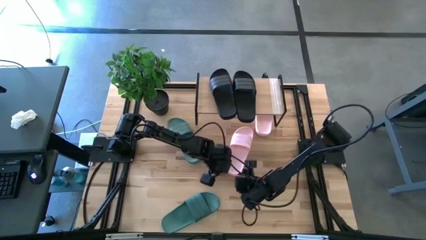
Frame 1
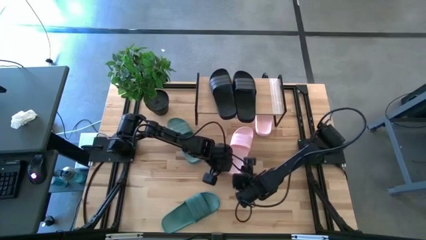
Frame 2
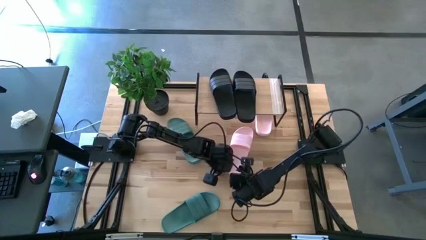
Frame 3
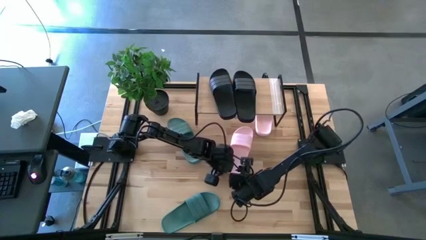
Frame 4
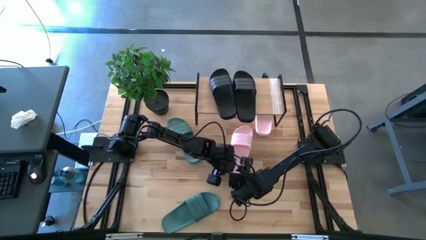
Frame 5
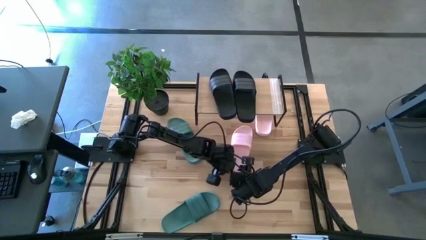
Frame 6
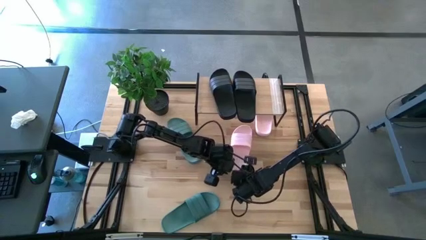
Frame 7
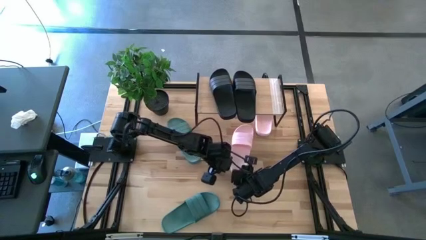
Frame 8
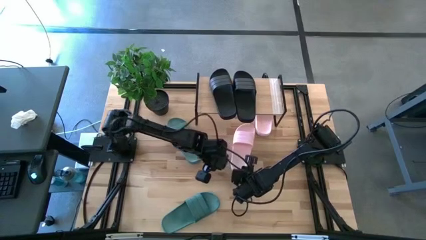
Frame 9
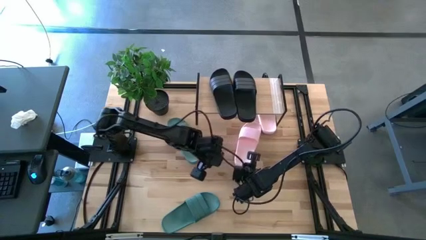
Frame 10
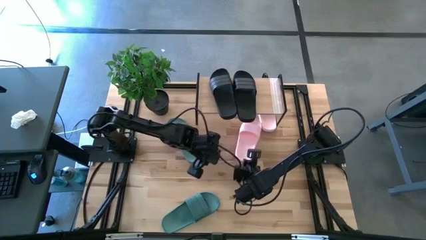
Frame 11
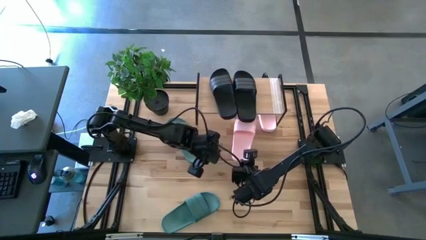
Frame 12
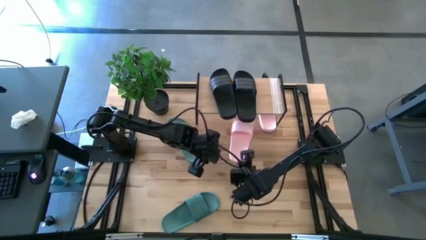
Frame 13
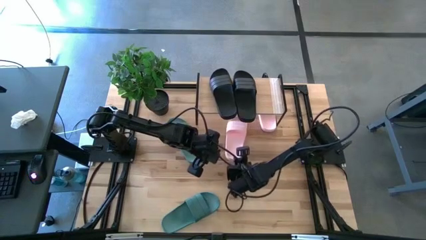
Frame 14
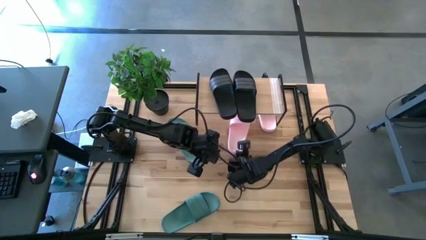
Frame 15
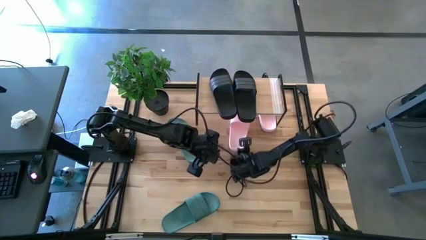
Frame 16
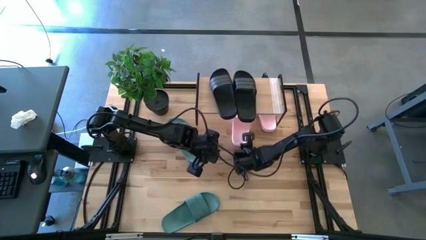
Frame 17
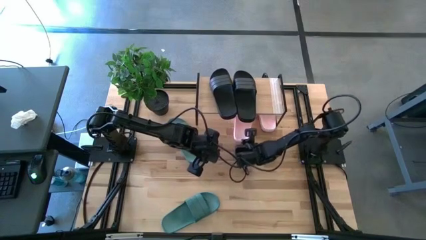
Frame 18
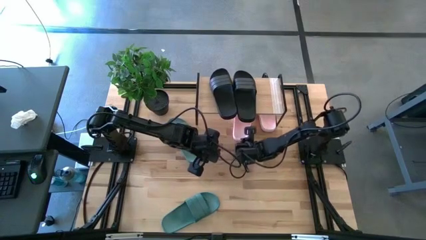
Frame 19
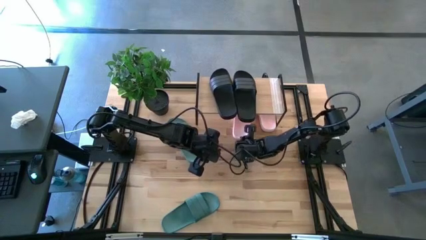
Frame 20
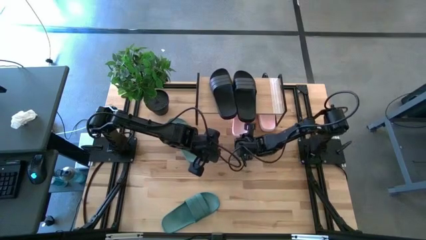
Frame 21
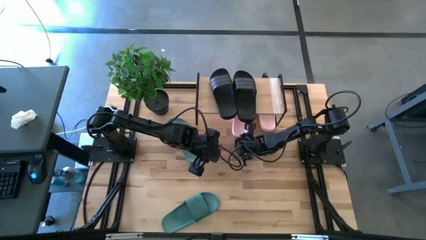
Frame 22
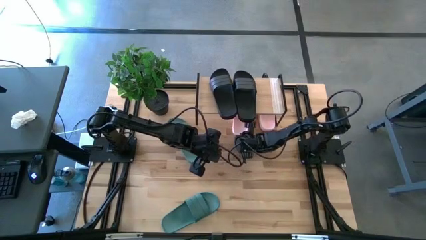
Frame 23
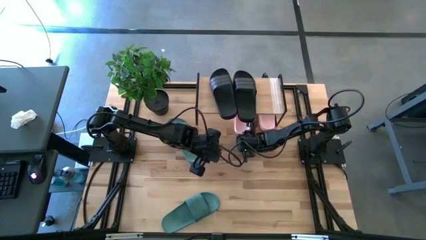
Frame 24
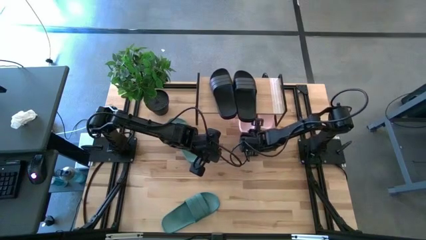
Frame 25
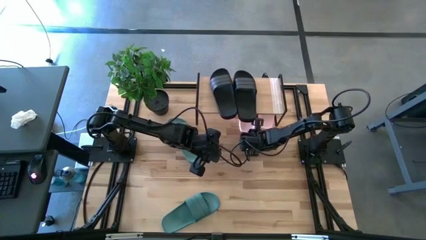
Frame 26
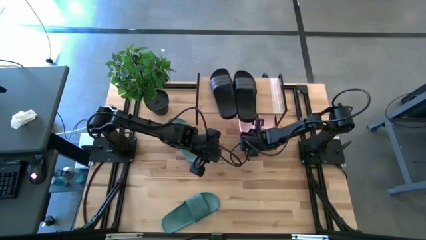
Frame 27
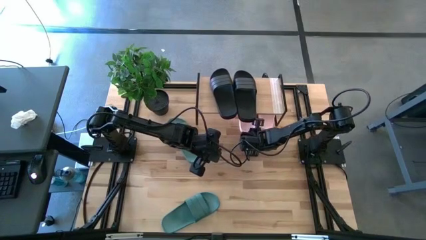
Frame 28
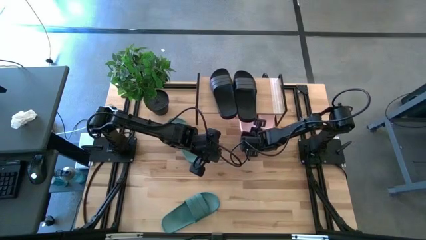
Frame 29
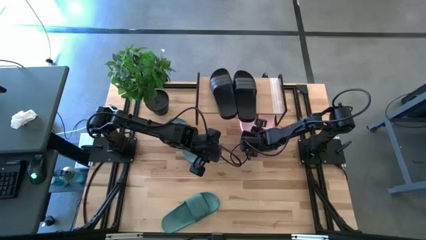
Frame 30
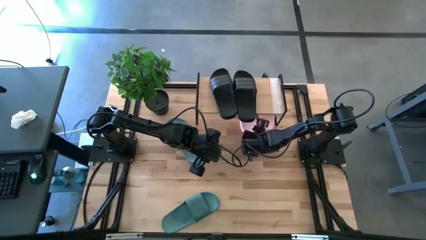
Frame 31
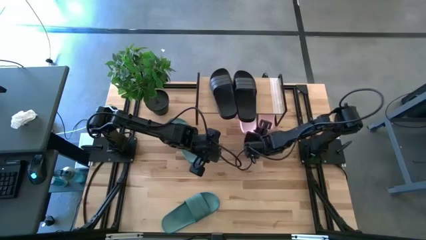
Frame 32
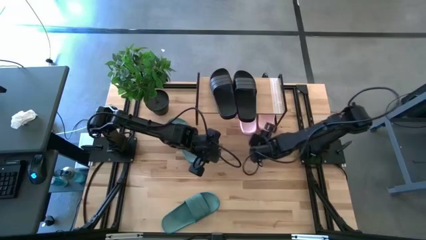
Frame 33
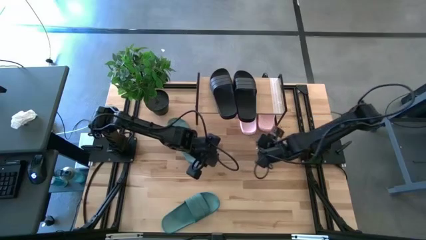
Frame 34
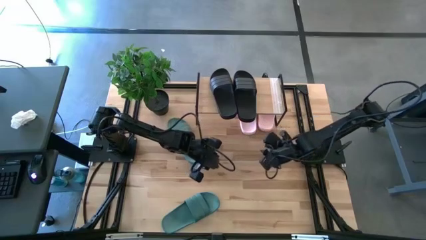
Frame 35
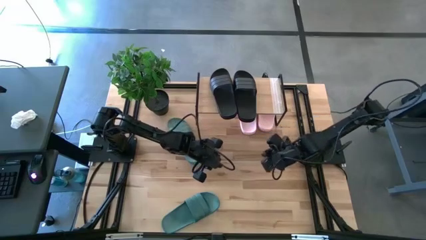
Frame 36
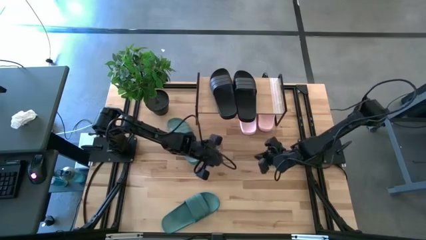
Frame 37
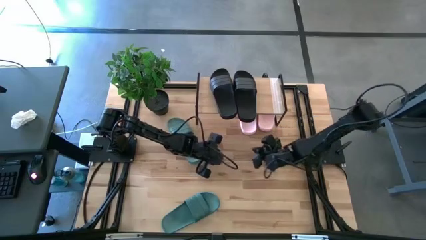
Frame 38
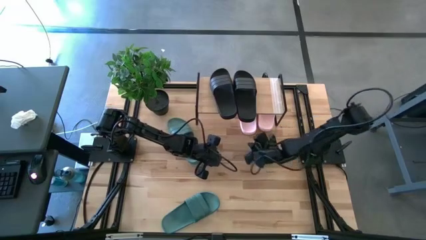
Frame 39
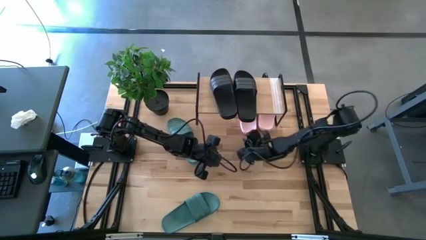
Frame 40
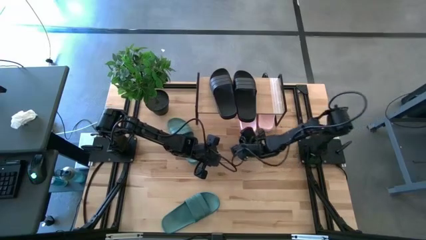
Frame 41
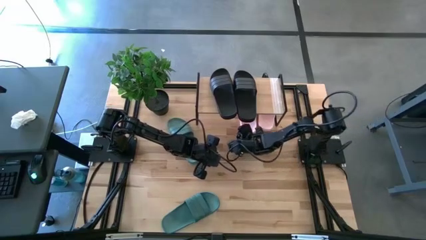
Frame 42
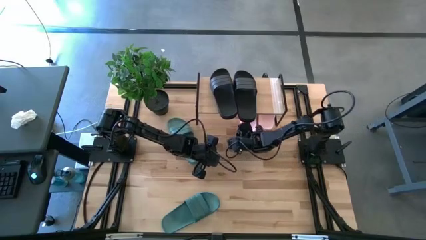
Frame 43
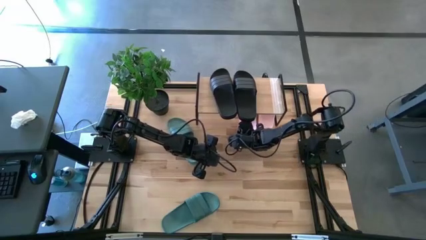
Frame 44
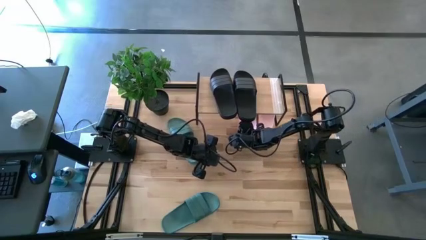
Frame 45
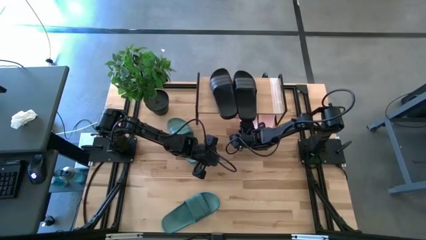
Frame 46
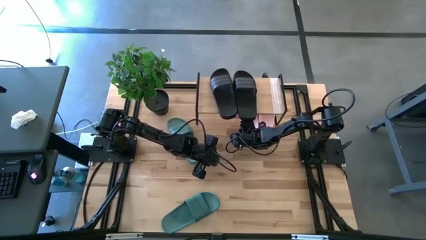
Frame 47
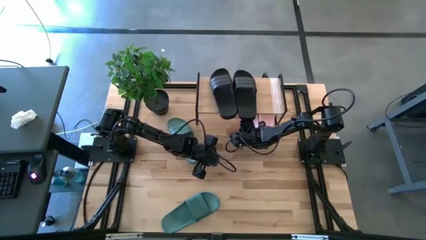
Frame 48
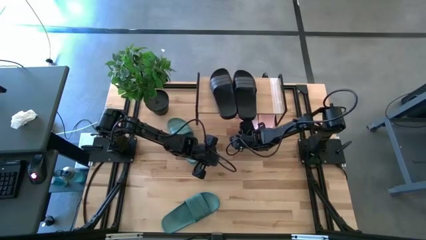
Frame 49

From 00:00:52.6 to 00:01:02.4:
Task: Pick and place slides into the shelf
Put the pink slipper under the shelf

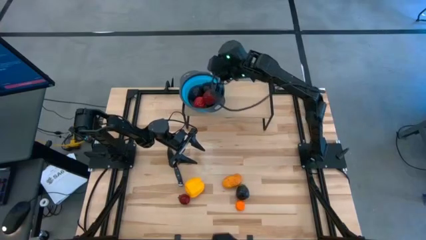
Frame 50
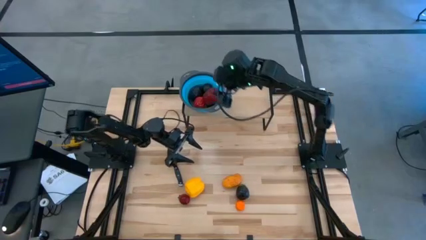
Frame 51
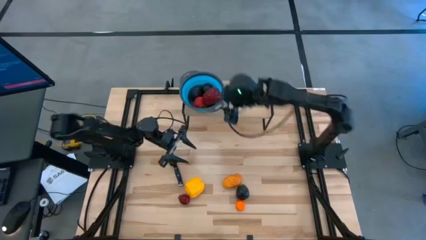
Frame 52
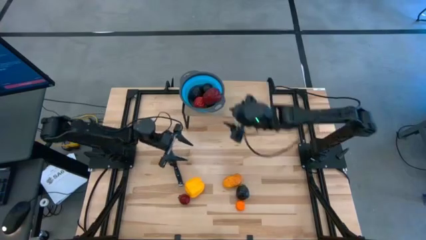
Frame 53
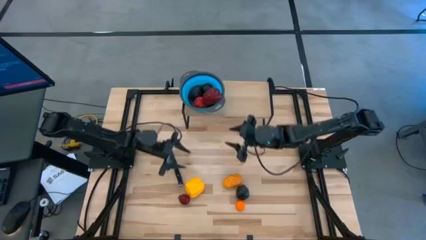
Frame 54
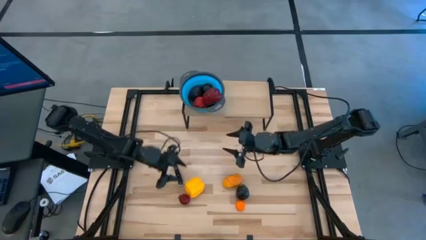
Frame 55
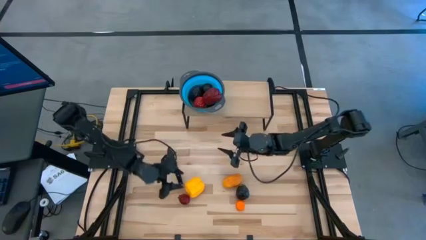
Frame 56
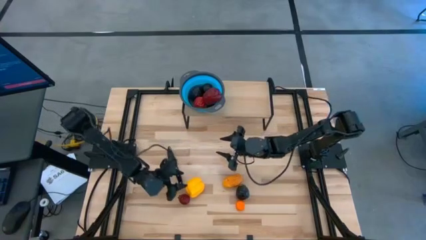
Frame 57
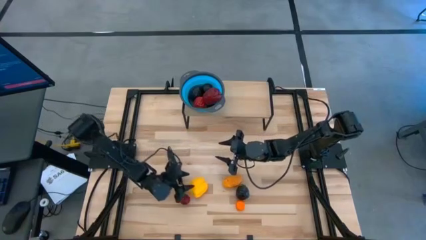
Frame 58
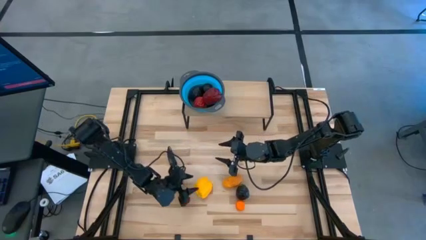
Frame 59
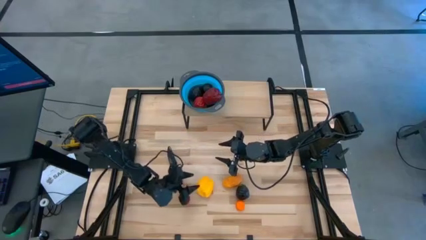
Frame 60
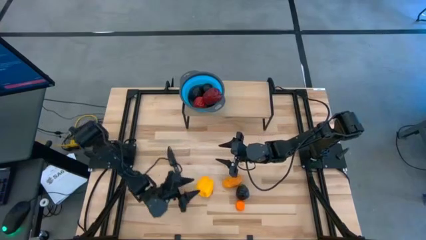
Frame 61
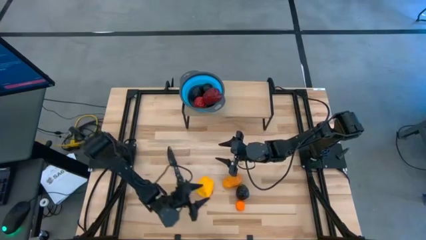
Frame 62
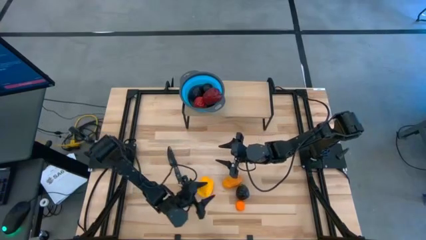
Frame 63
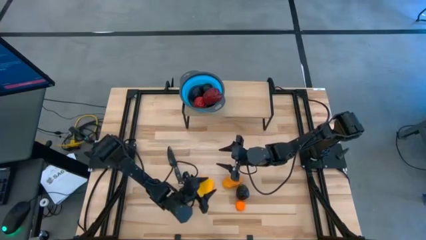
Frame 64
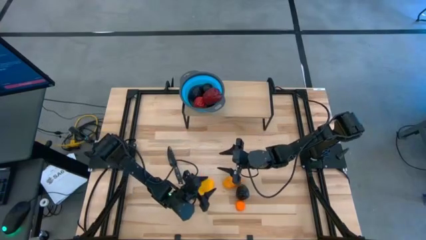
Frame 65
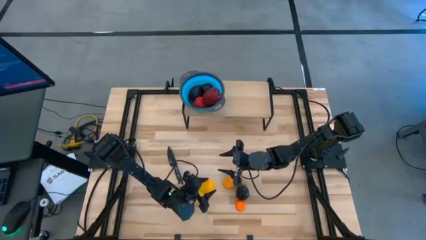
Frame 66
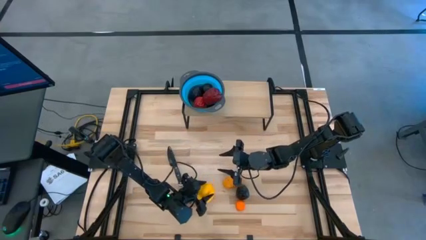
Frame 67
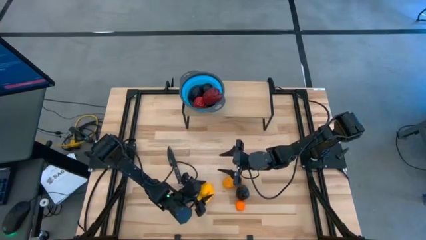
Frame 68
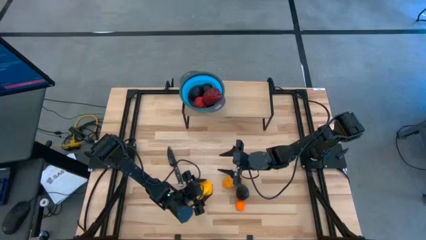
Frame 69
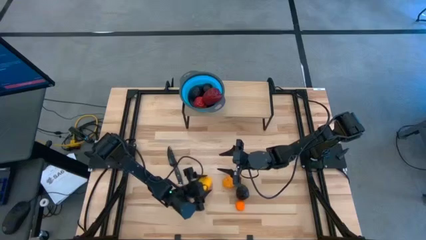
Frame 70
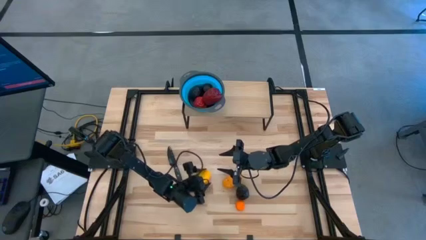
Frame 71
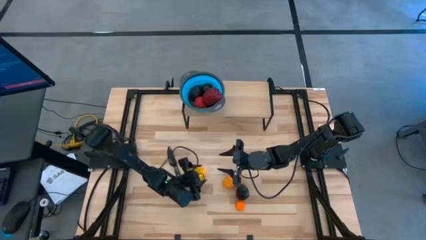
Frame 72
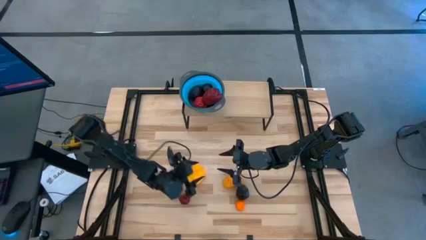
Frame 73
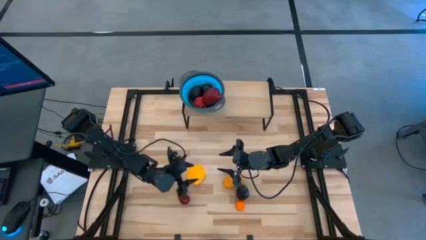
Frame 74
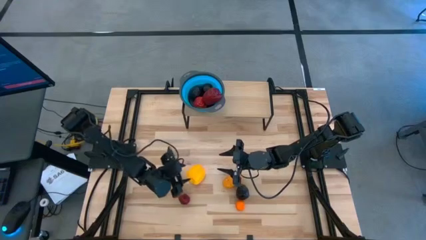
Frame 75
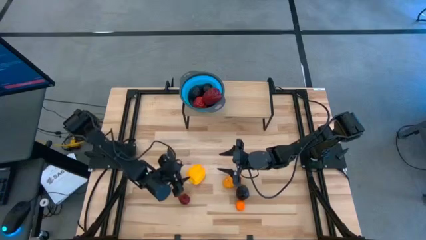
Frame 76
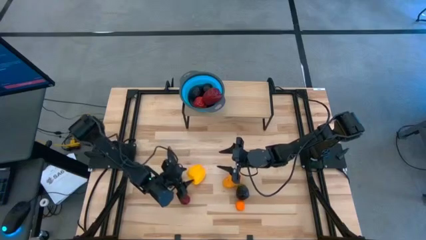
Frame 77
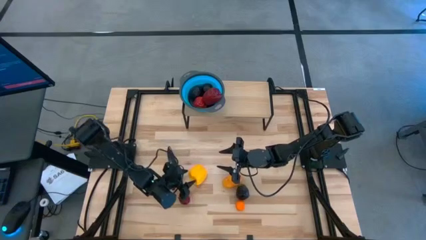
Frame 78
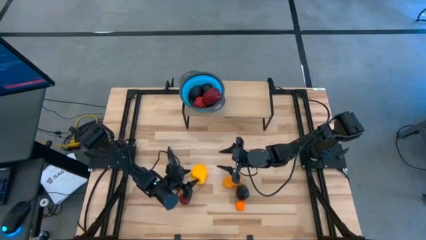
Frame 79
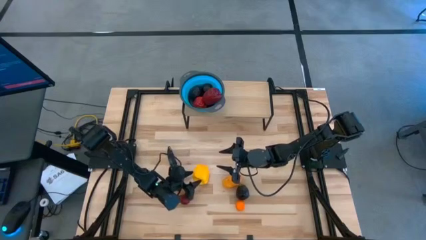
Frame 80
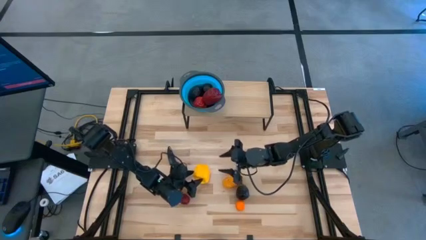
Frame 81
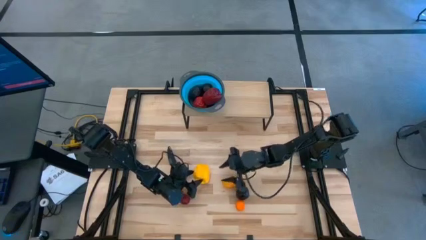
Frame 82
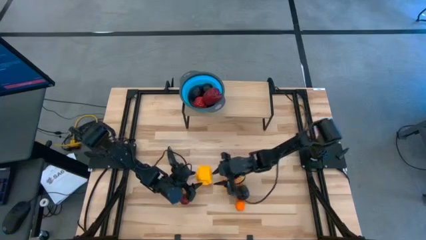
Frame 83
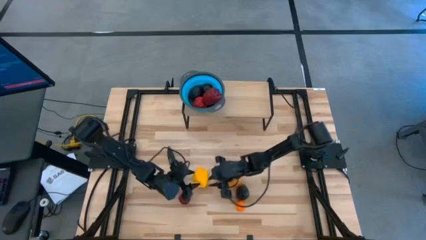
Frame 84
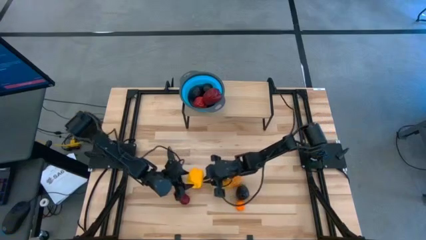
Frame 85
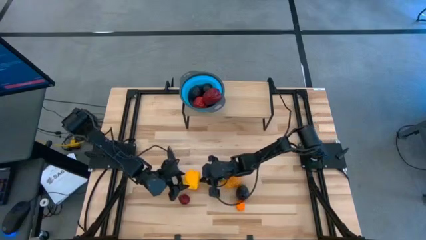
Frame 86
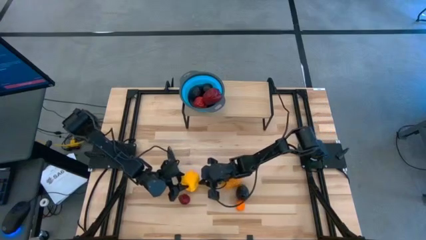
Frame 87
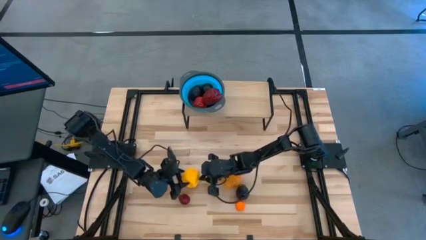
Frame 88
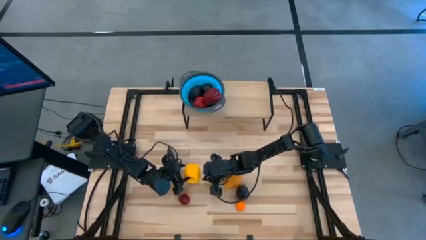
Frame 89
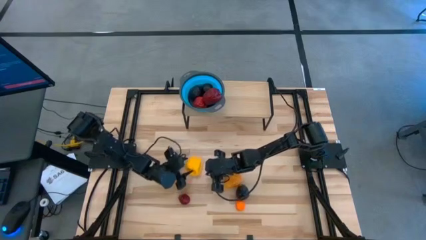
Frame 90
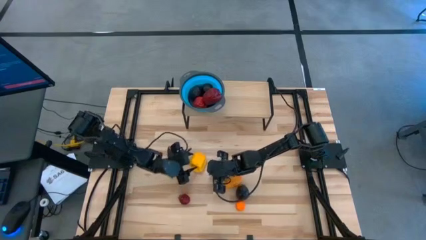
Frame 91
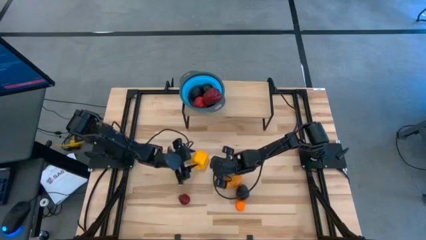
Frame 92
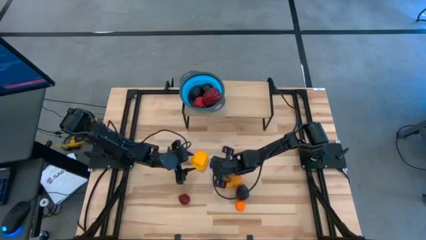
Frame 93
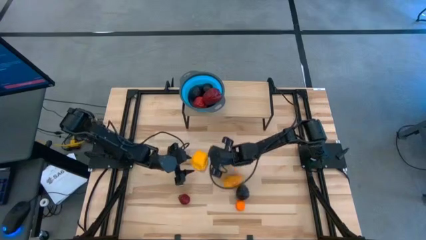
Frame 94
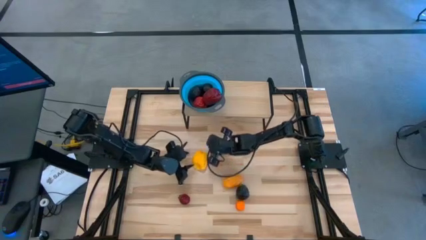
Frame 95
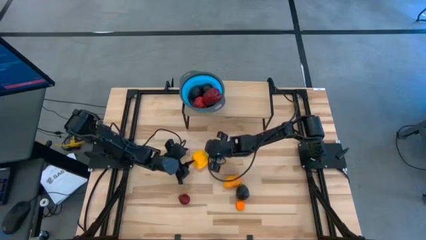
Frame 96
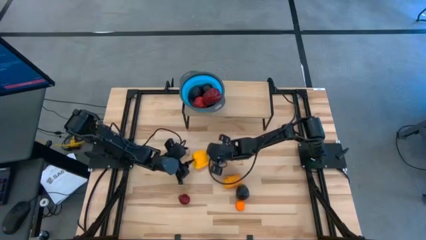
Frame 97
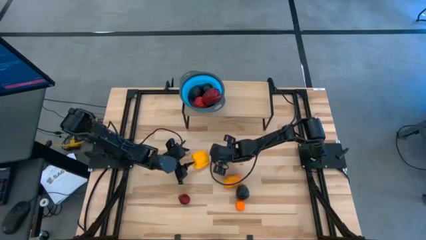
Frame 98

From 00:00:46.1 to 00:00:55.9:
Task: Pick & Place Fruit
Put the yellow pepper into the blue strainer bowl on the shelf
